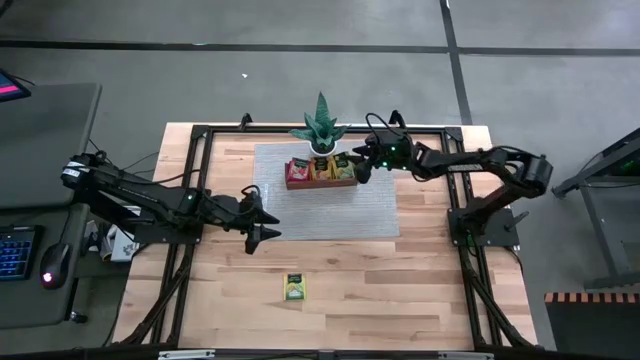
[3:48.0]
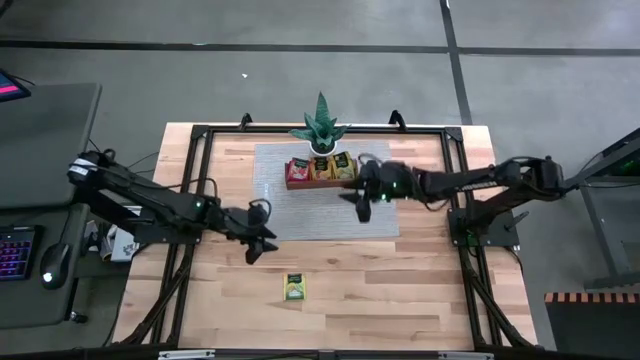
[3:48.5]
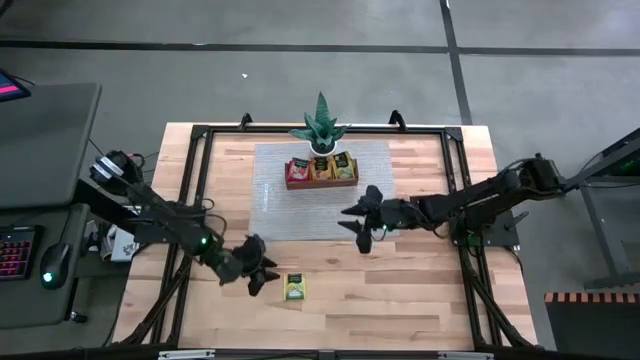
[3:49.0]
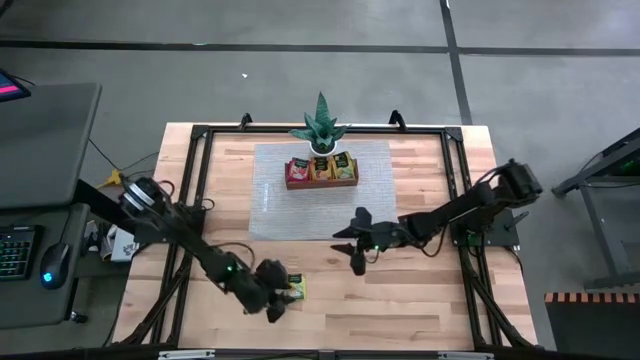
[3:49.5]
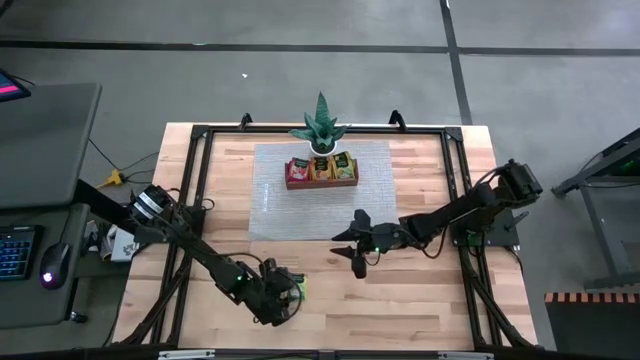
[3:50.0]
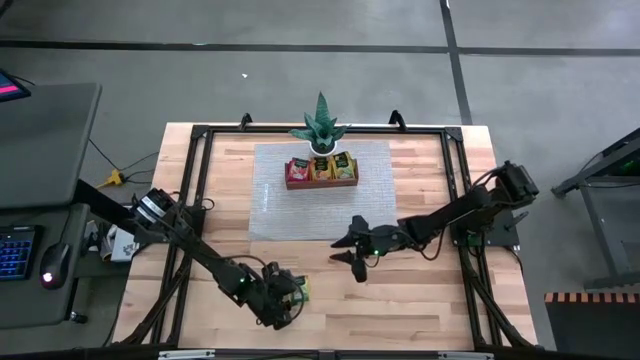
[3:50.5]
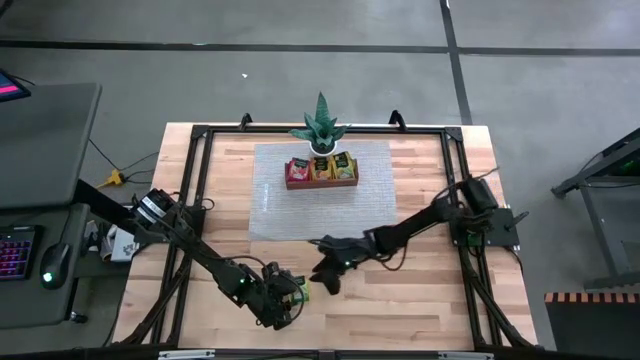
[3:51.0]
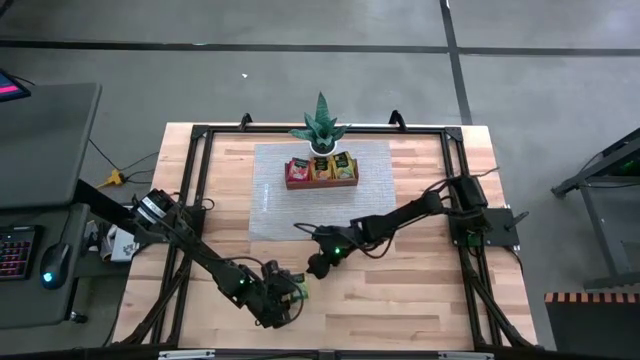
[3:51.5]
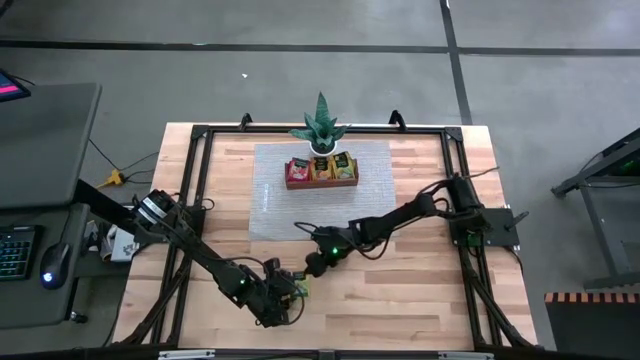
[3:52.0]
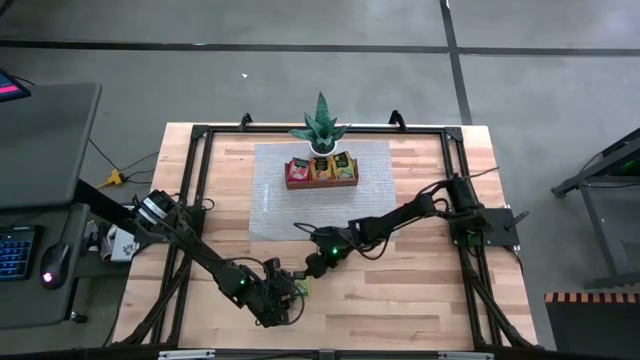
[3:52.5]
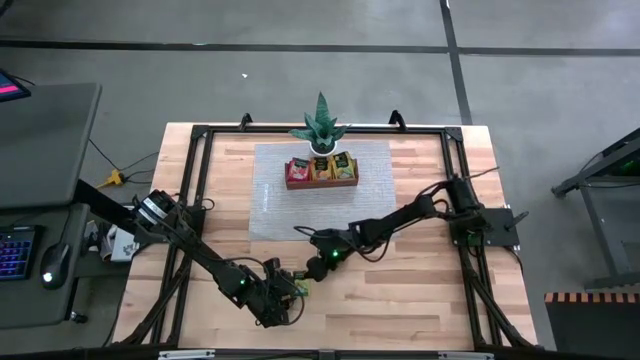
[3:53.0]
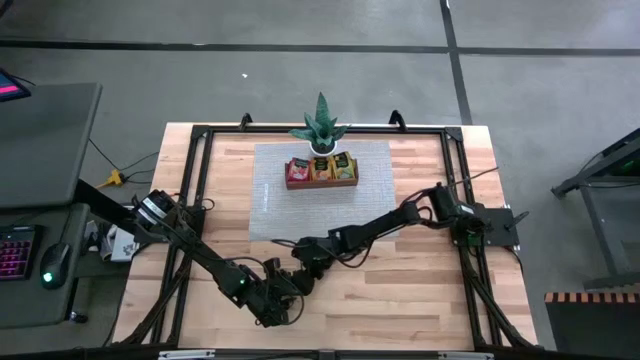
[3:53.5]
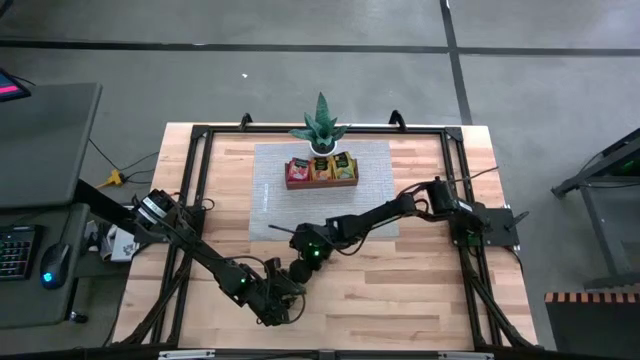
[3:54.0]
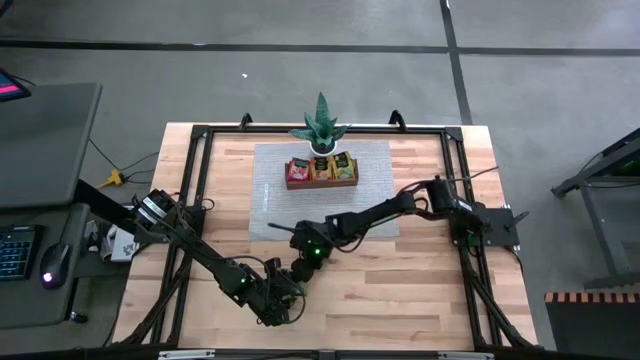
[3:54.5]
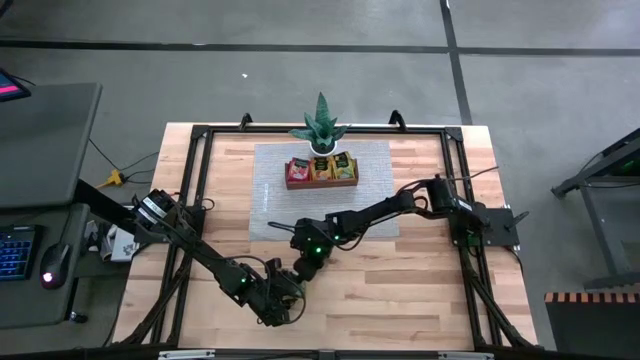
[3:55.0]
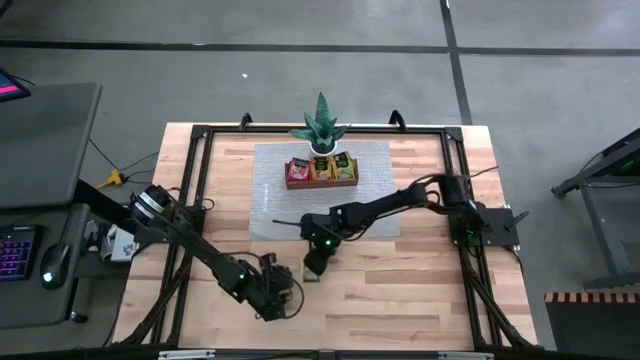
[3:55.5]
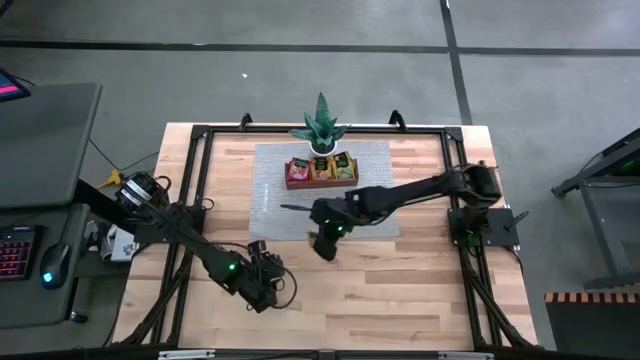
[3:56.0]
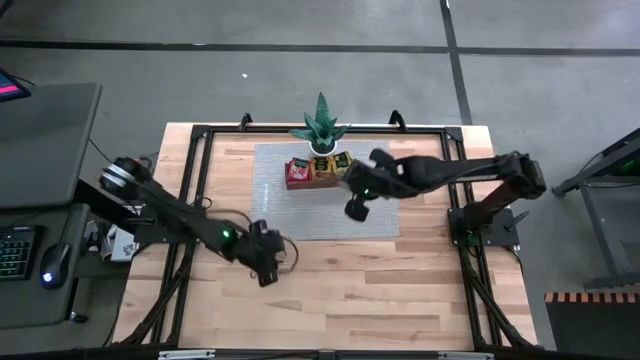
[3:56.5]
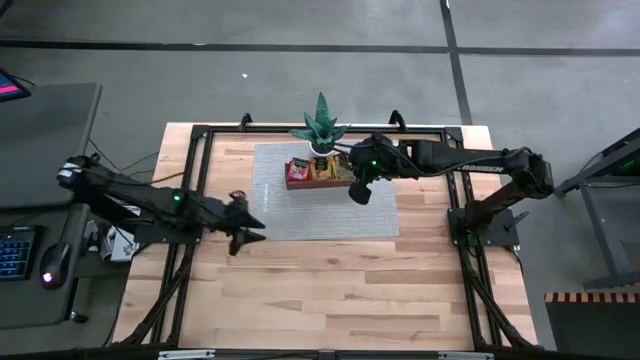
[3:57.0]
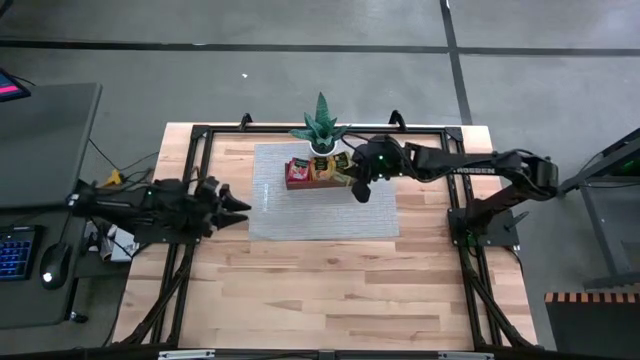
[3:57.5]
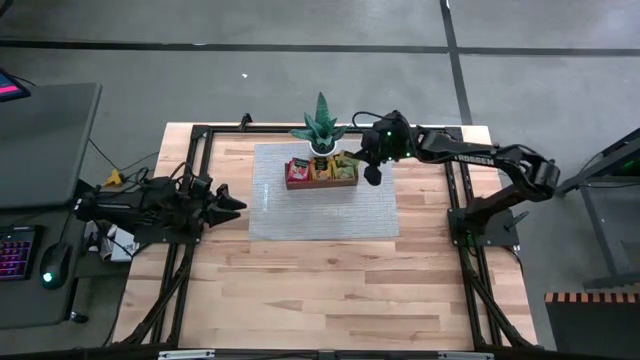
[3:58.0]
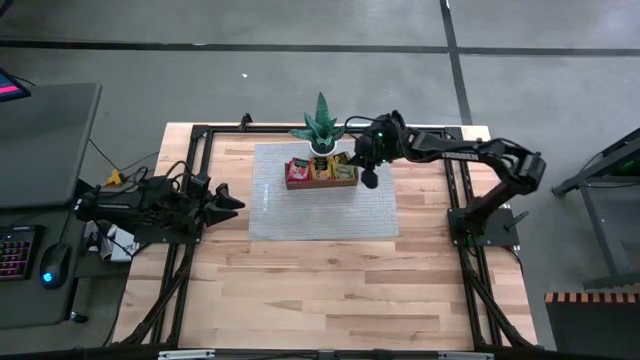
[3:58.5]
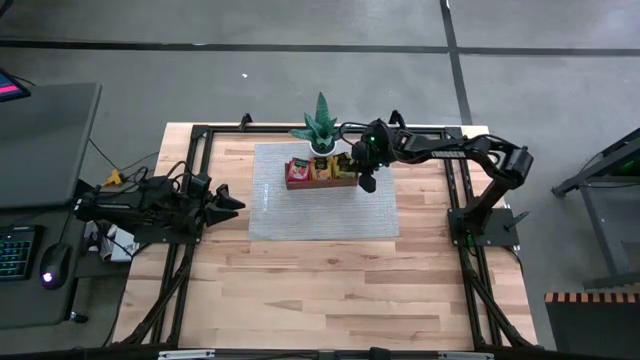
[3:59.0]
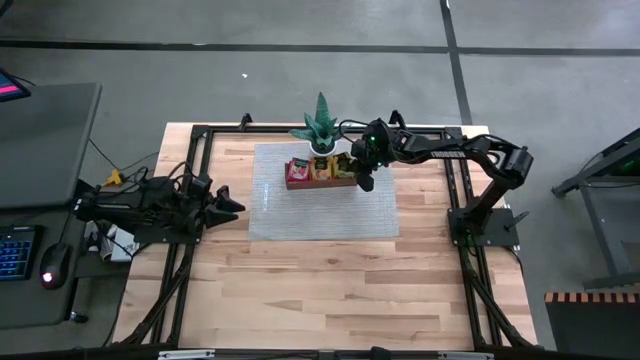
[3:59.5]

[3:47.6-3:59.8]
Task: Pick & Place Tea
Put the yellow tea bag into the right section of the wooden organizer

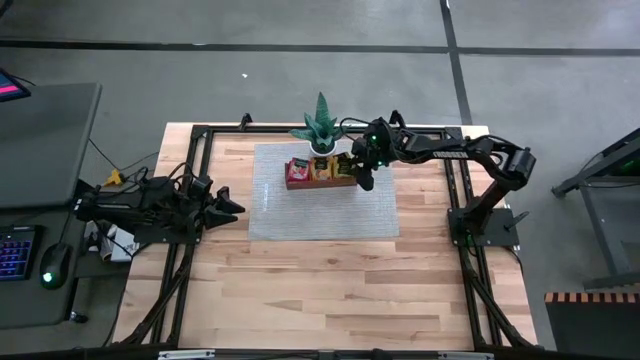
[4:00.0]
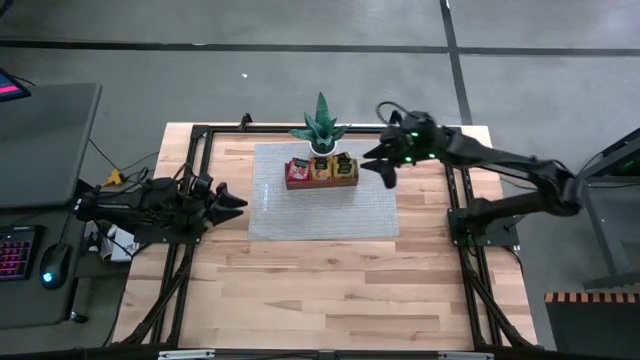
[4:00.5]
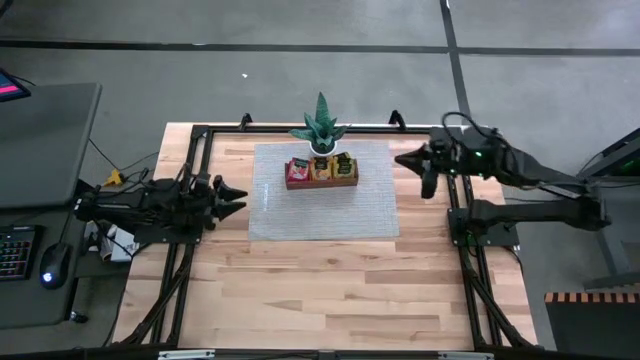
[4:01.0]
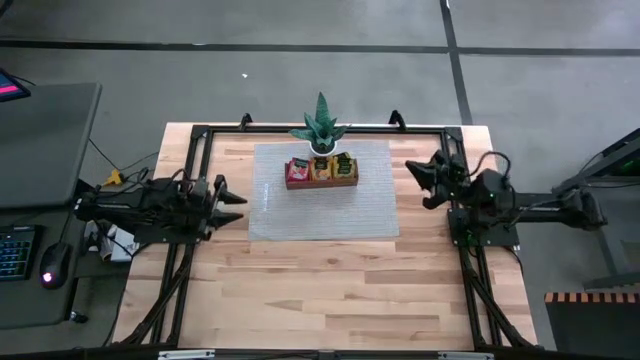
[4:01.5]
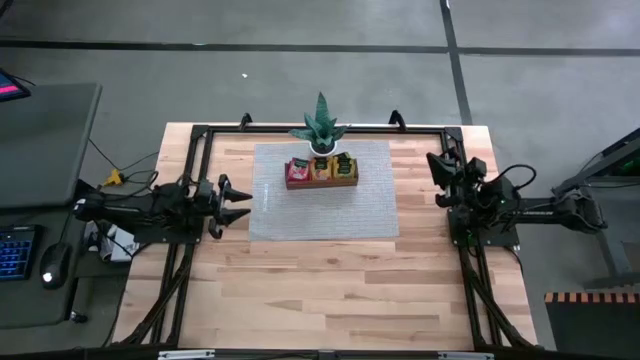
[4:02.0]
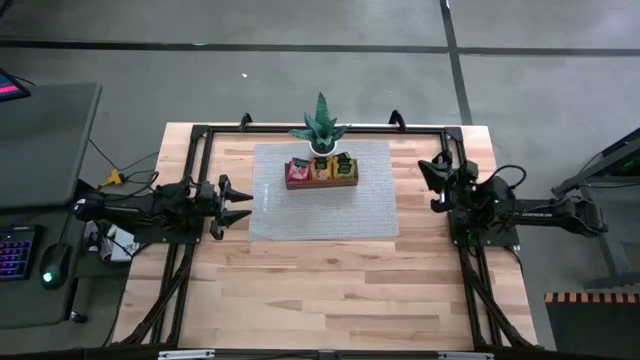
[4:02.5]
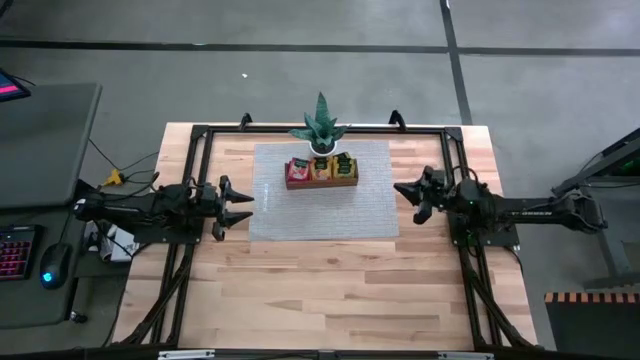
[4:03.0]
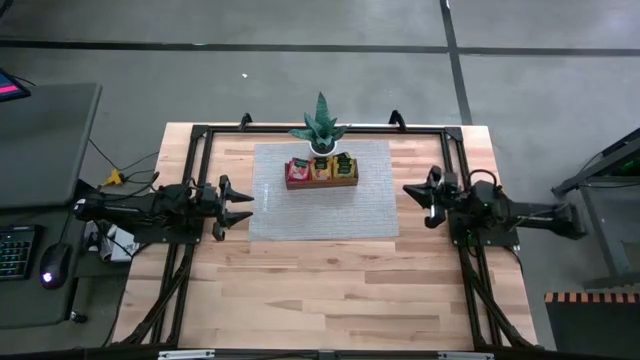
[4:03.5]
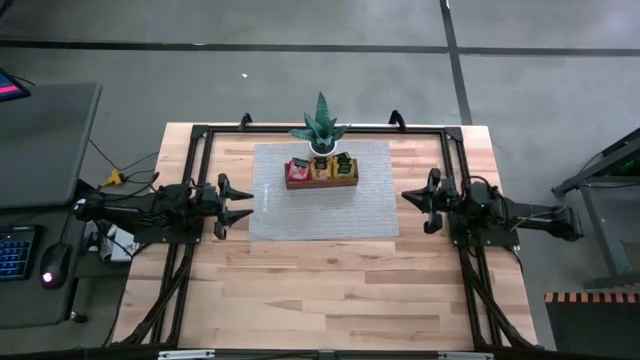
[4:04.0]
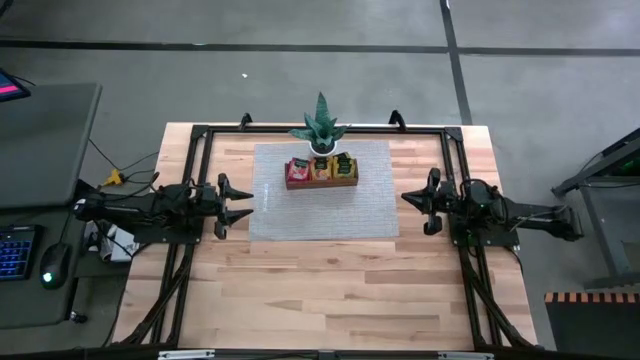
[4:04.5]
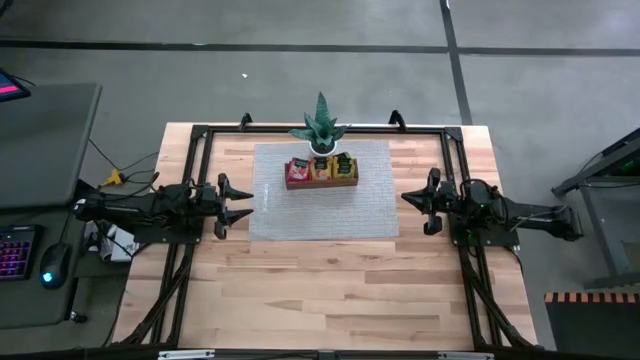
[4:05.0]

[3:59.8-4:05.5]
Return to Home Position

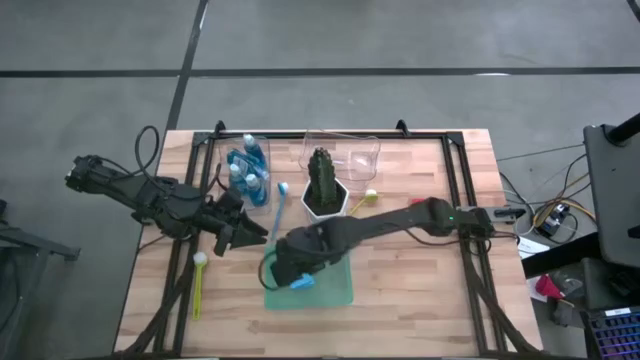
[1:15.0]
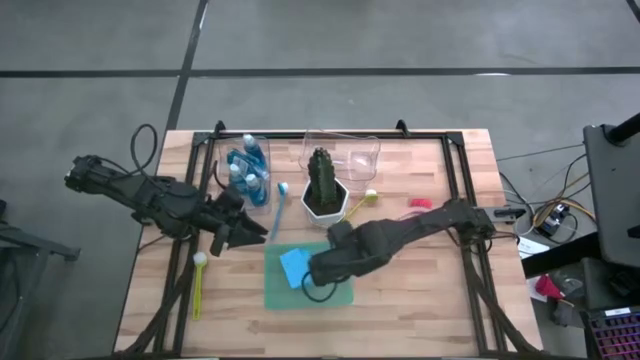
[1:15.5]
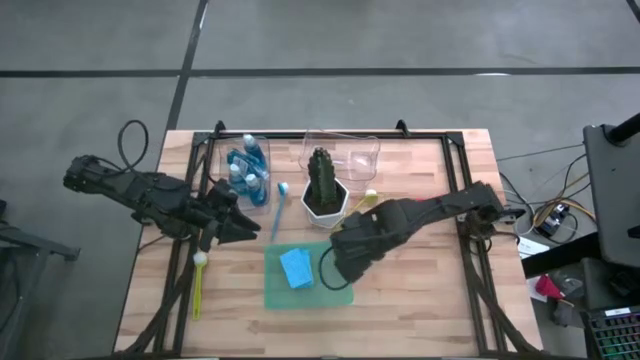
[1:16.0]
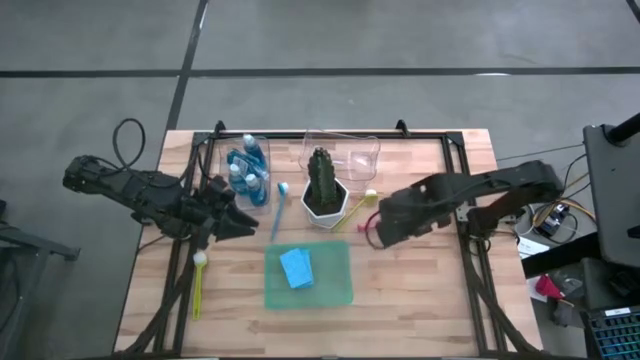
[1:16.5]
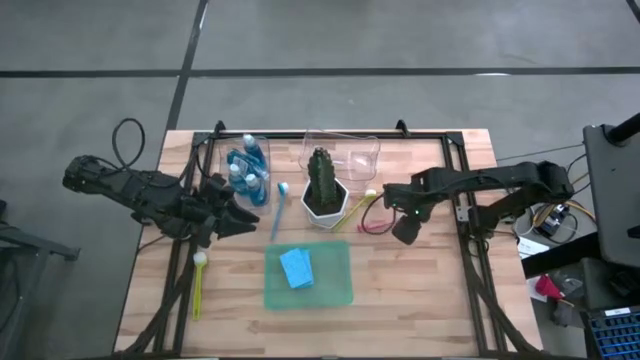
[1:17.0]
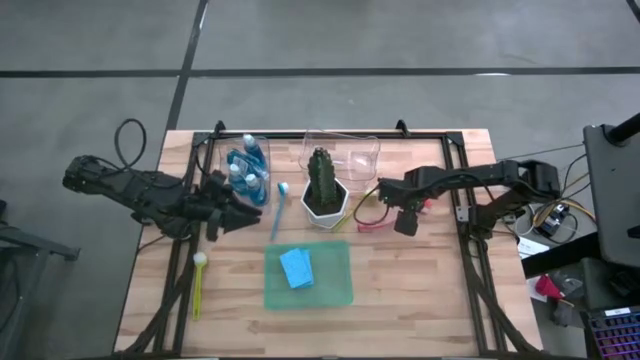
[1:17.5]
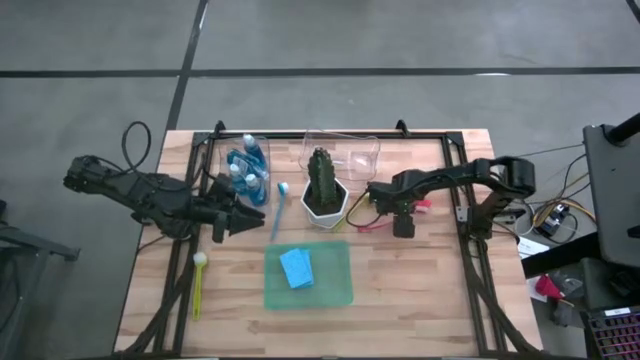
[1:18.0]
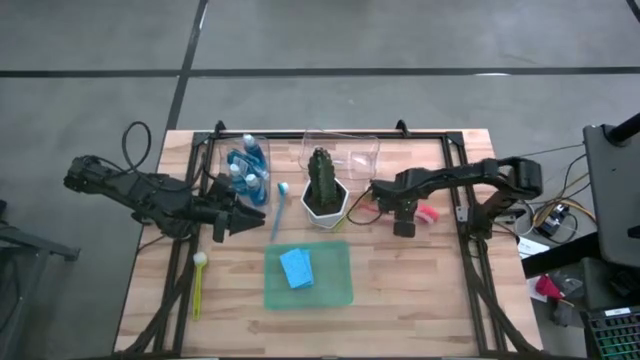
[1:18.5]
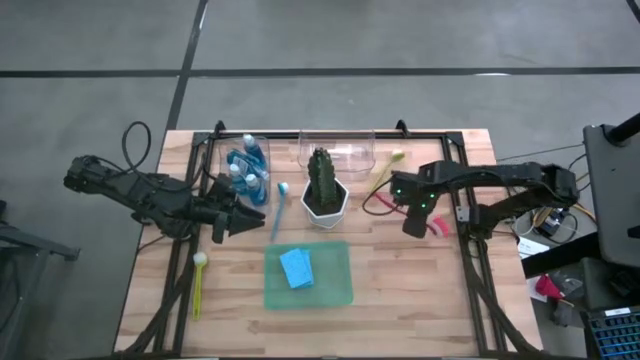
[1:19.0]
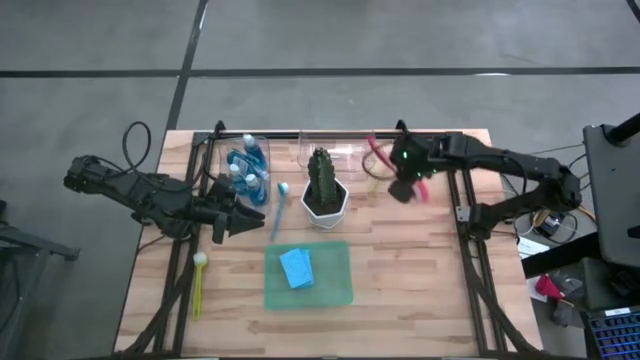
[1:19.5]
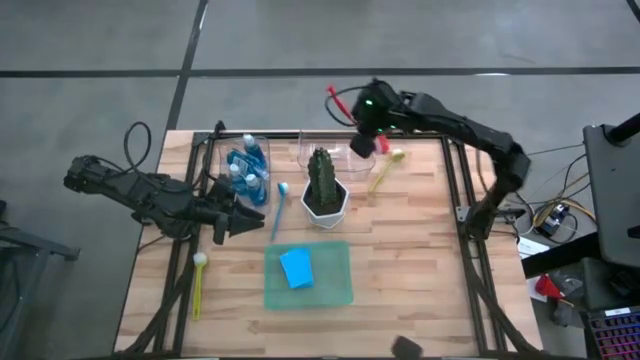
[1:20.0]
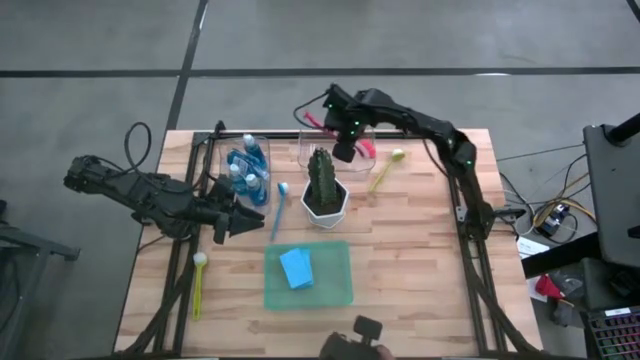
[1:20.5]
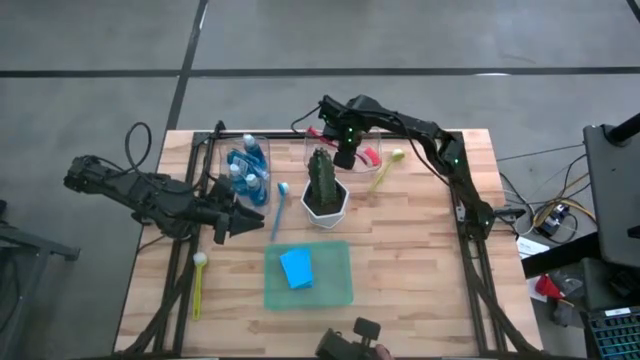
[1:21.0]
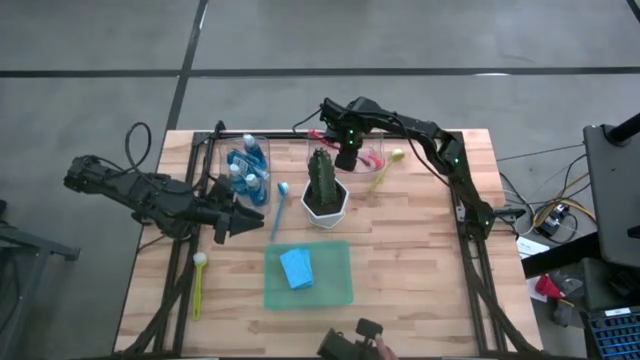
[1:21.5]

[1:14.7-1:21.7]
Task: Pick & Place Kitchen Sink Supplies
Put the red dish brush into the right transparent bin
